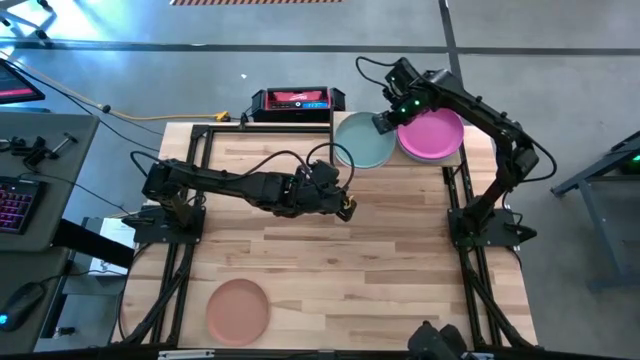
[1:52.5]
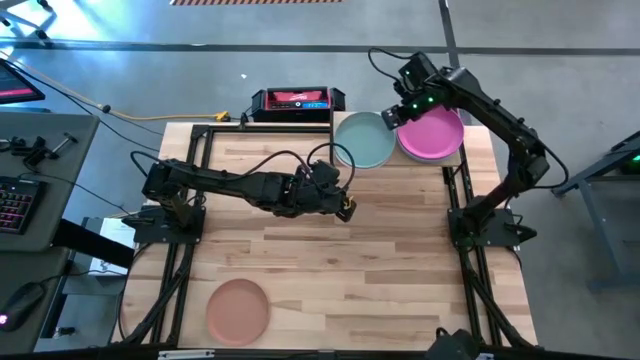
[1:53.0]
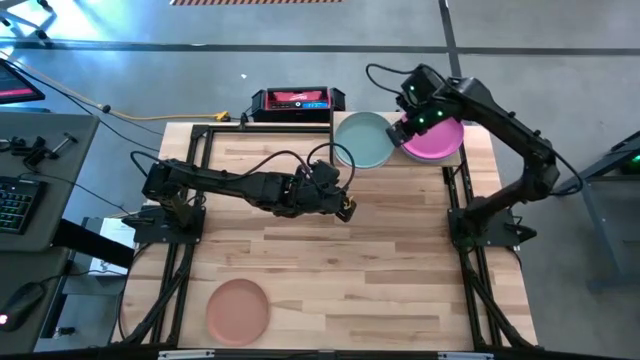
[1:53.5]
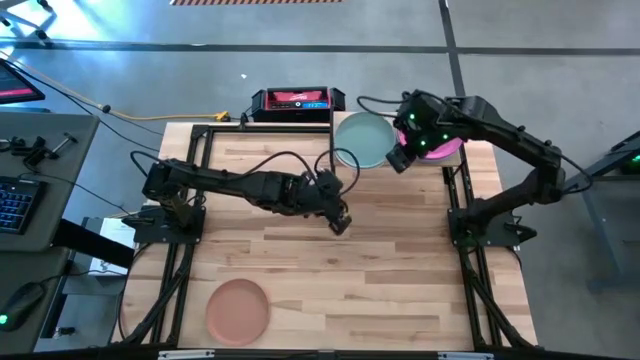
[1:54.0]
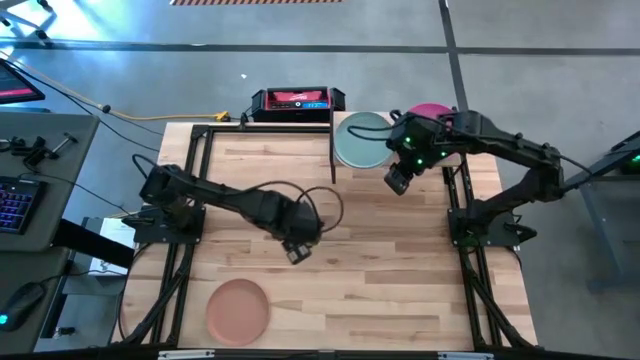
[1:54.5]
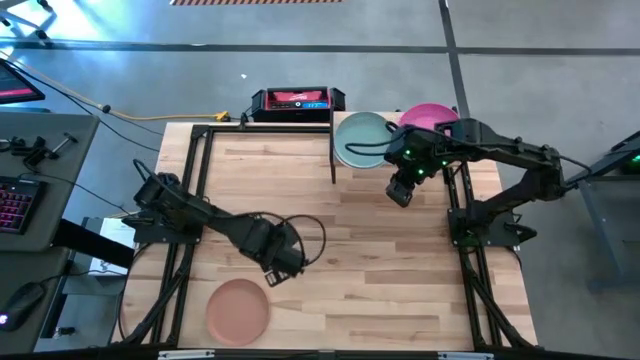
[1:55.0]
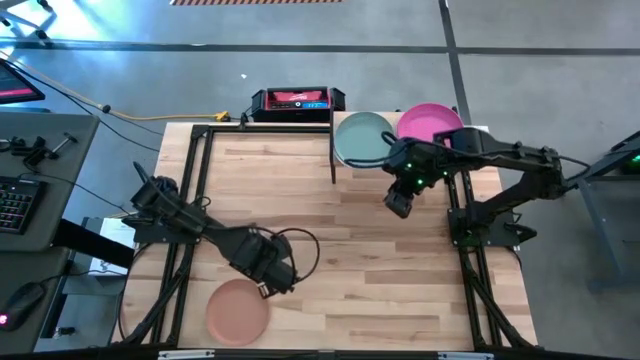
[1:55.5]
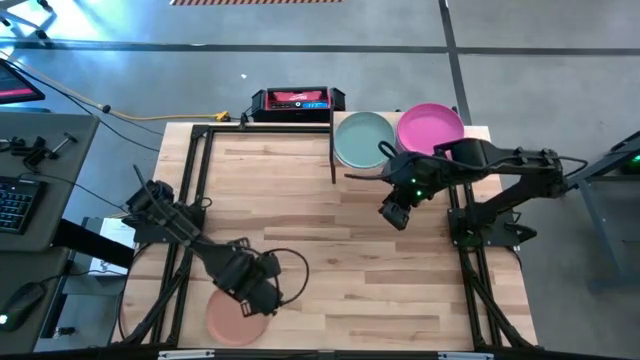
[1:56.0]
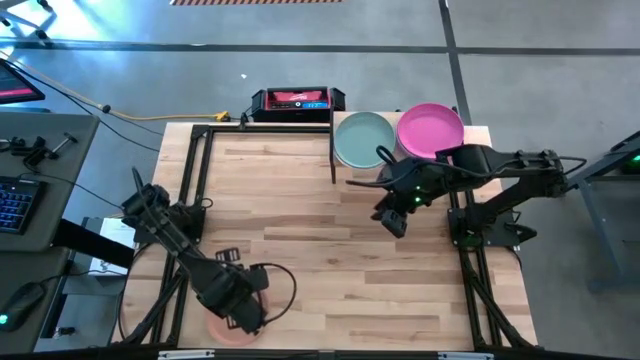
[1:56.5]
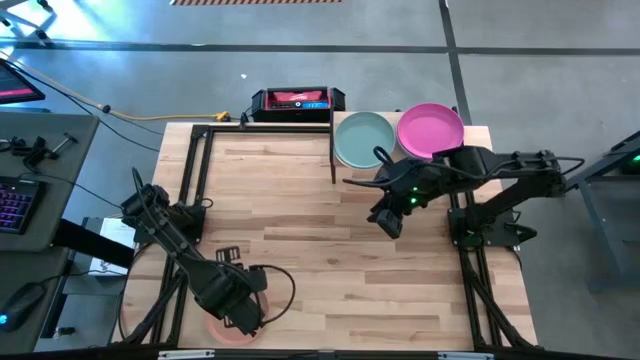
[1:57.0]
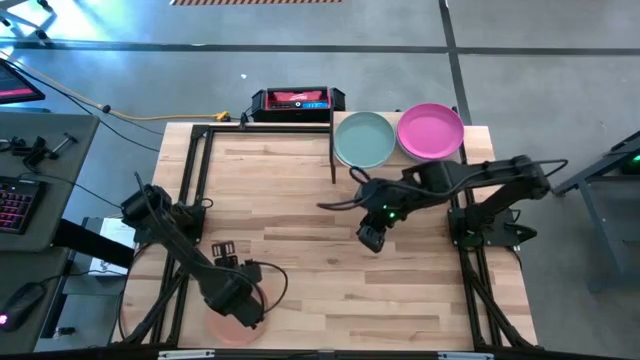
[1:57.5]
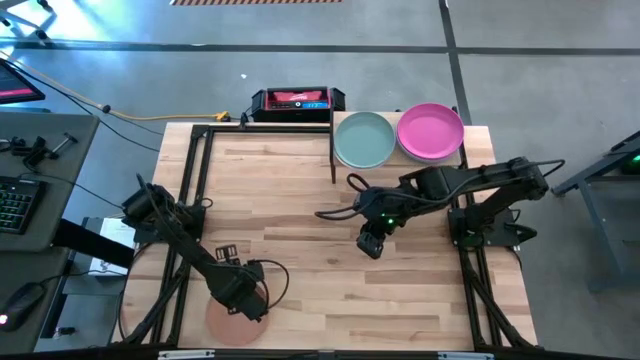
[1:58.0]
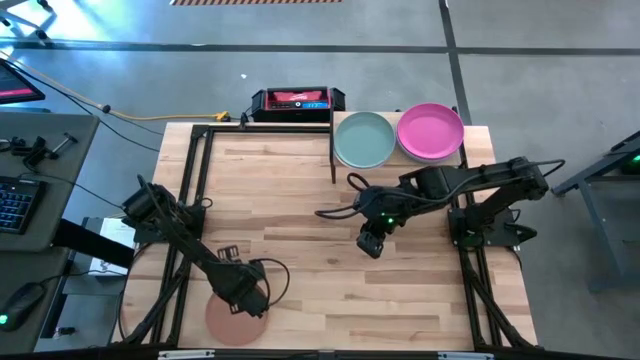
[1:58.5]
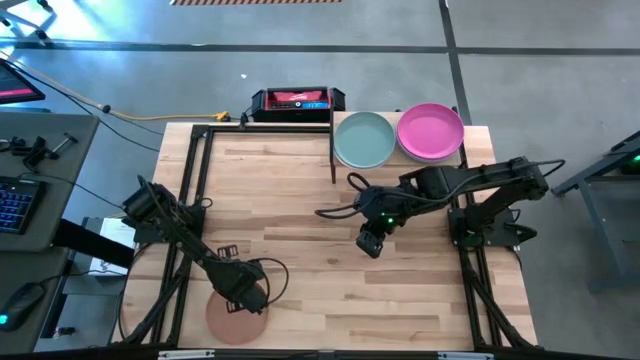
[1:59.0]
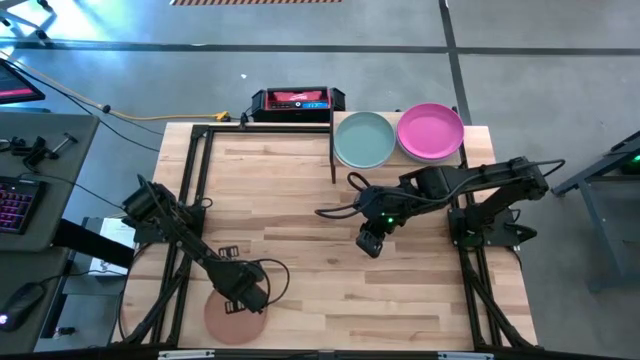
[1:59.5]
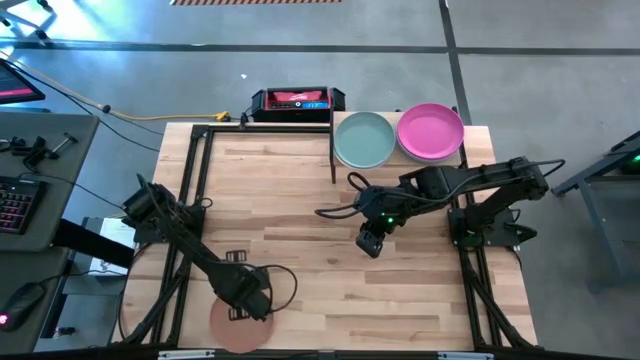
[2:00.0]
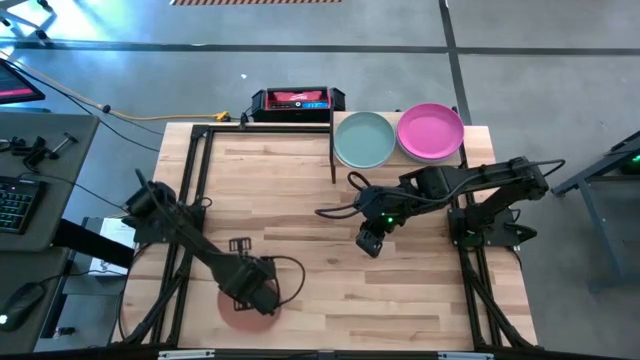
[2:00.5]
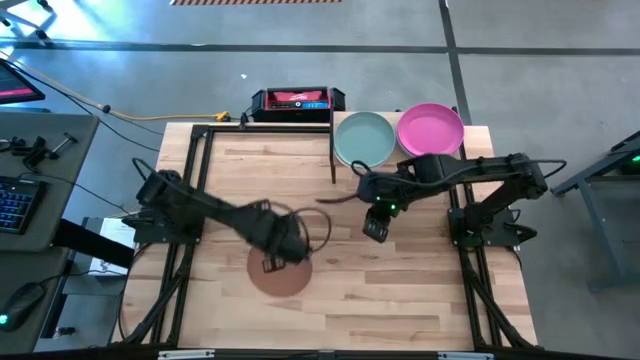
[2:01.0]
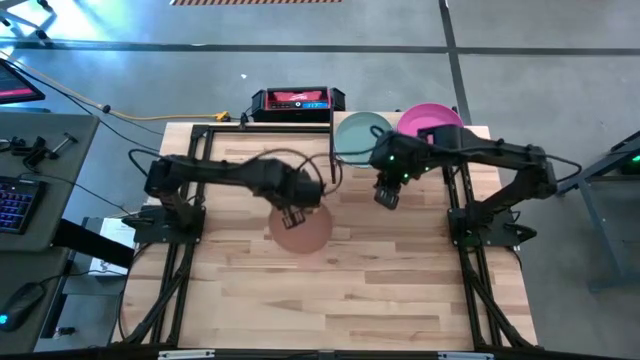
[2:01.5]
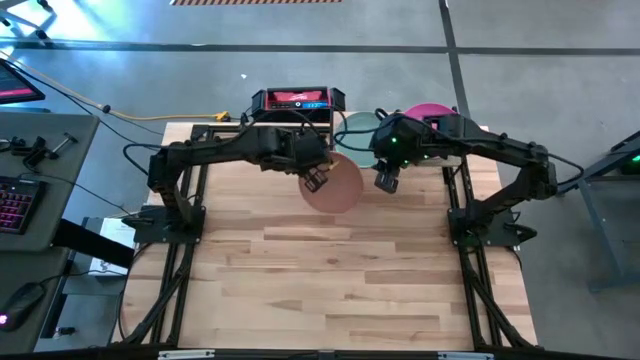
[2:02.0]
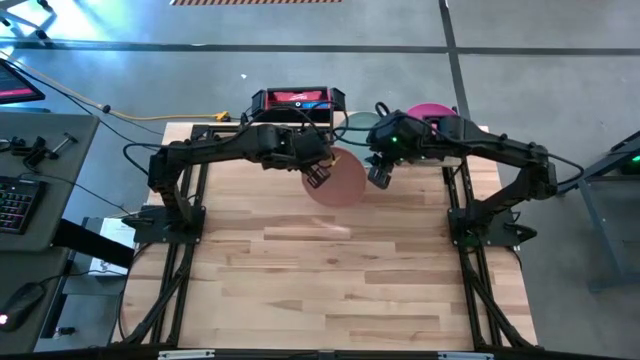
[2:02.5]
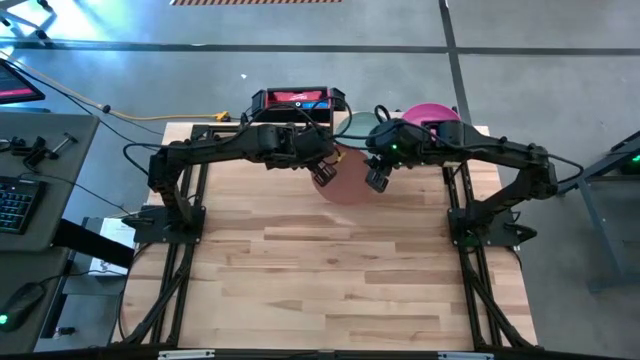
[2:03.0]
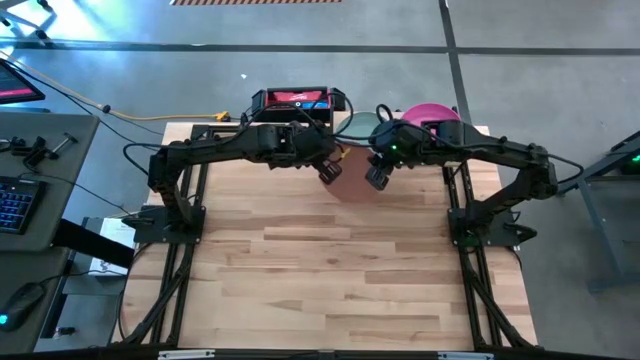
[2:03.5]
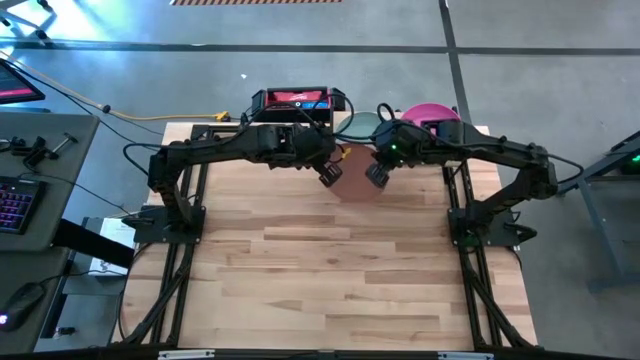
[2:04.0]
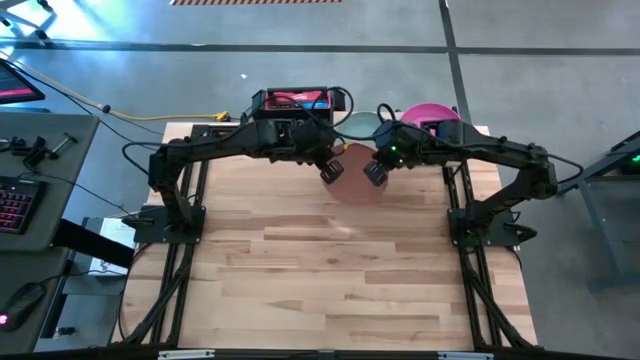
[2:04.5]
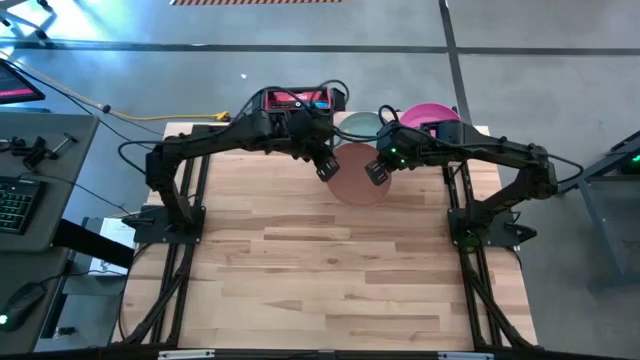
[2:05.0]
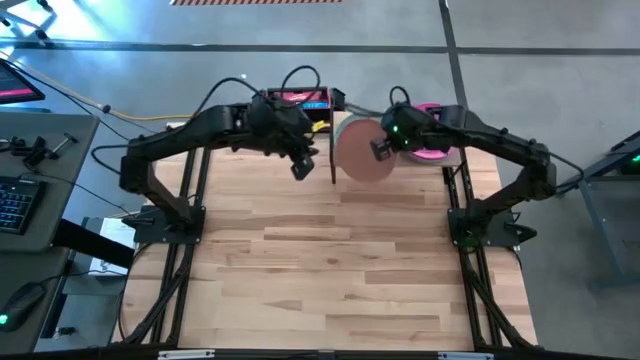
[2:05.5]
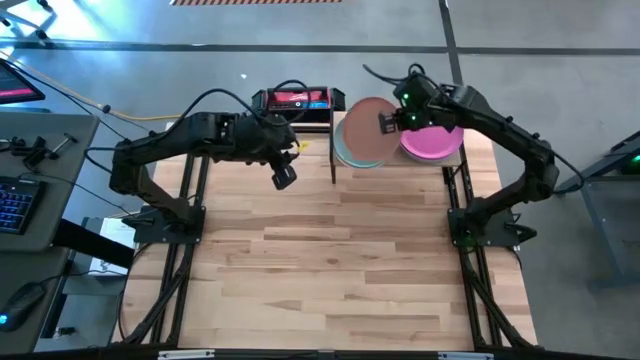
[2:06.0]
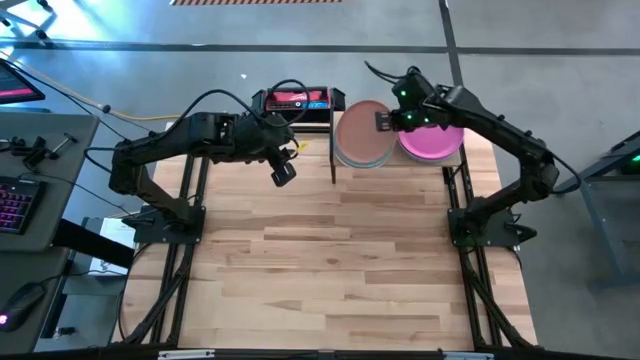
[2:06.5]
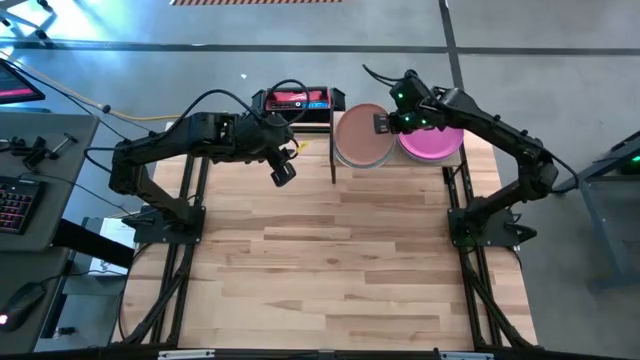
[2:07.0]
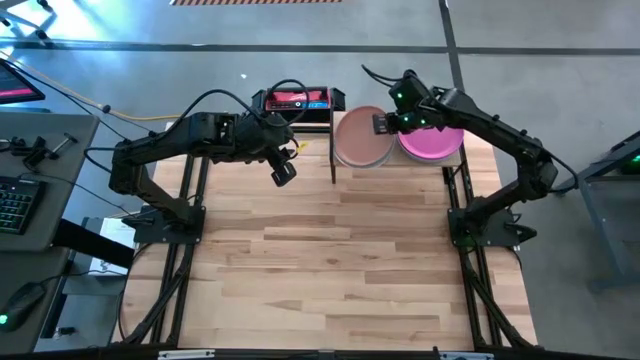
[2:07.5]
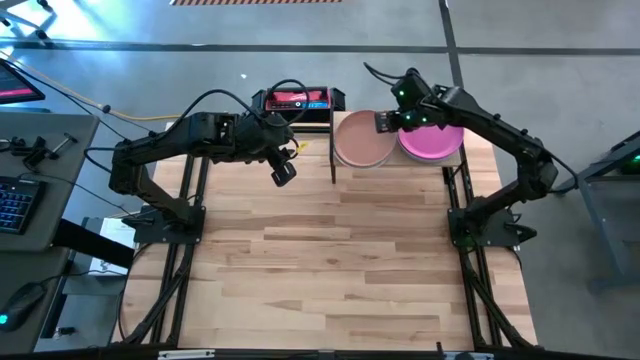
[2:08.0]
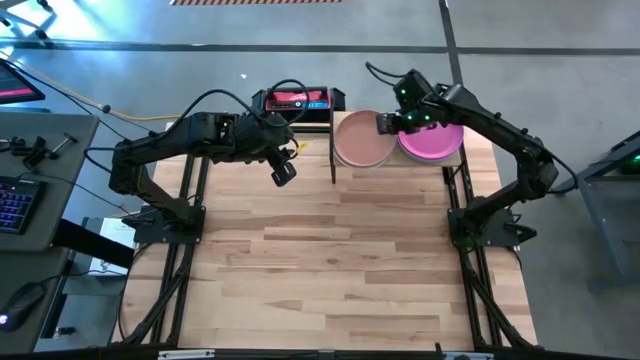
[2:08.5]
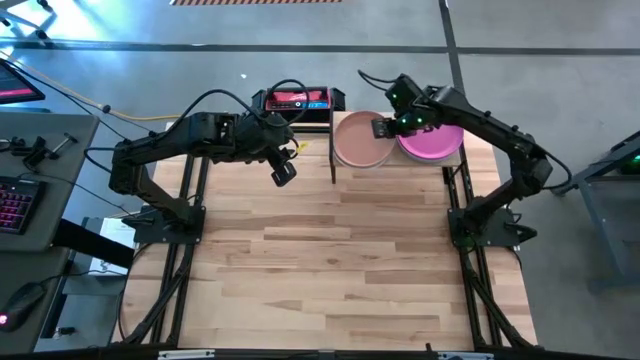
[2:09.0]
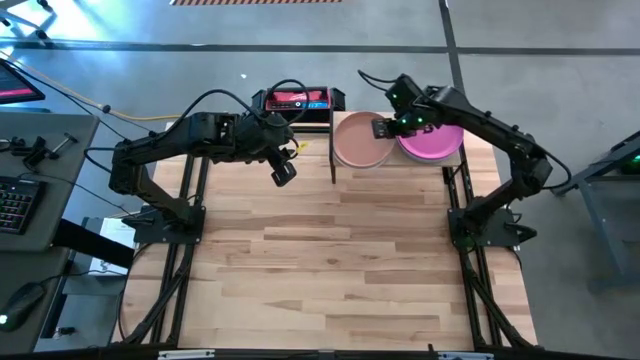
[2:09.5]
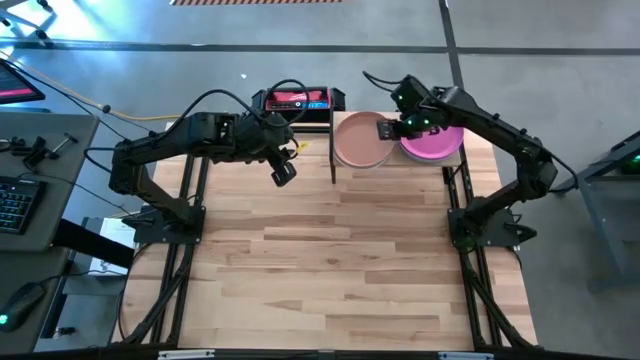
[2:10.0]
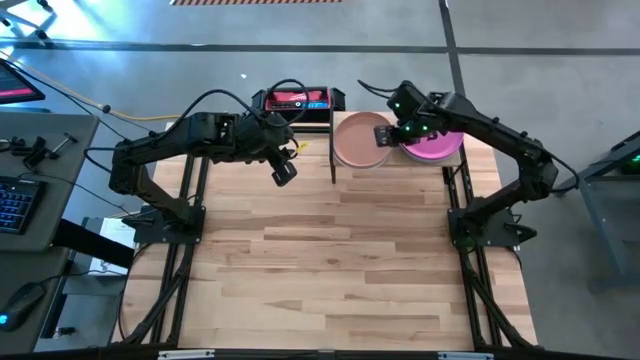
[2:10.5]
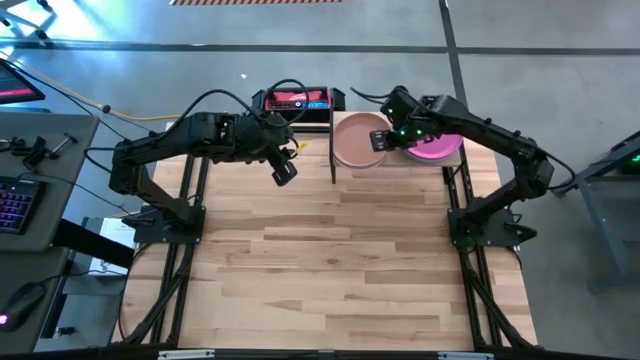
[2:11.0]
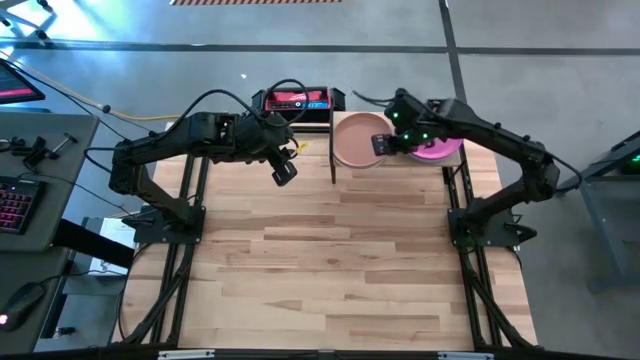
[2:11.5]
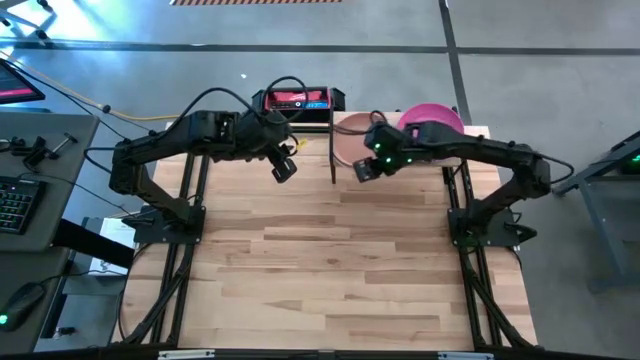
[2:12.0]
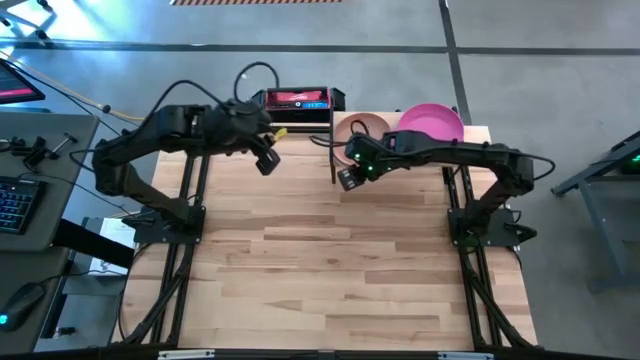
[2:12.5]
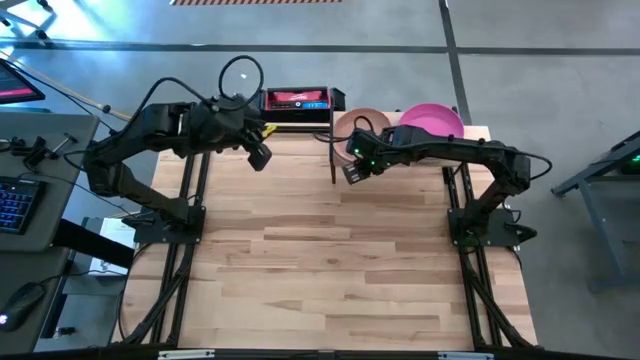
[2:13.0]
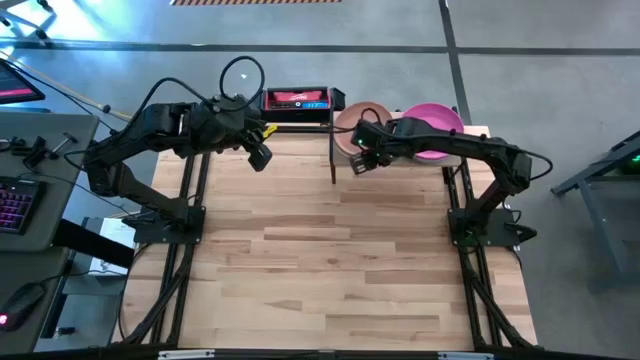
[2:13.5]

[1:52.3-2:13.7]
Task: Place and stack plates onto a shelf
Stack the brown plate on top of the green plate on the shelf

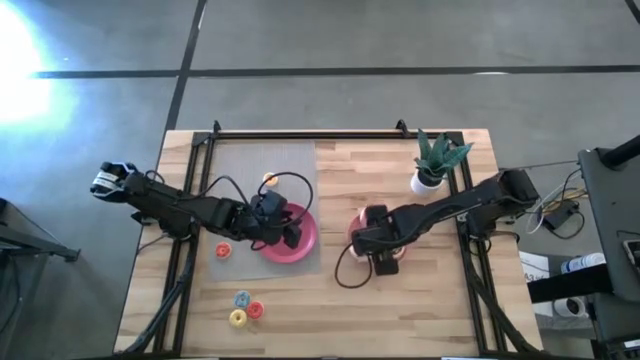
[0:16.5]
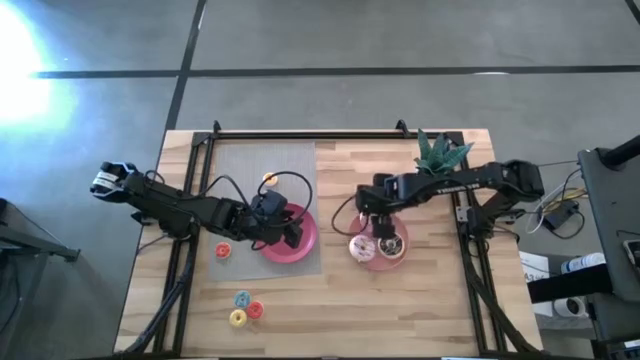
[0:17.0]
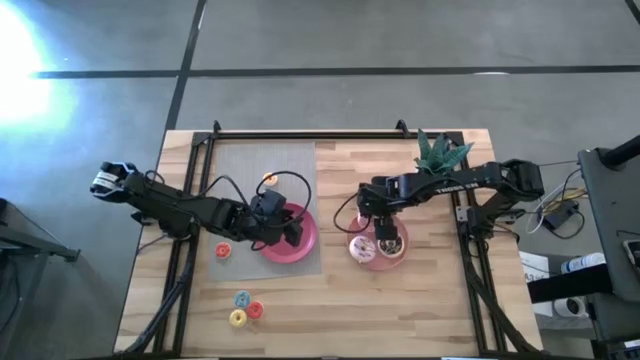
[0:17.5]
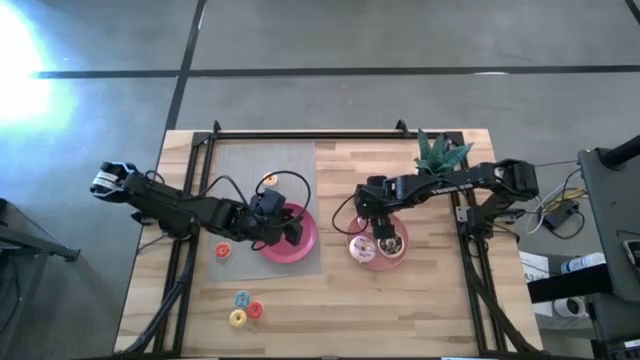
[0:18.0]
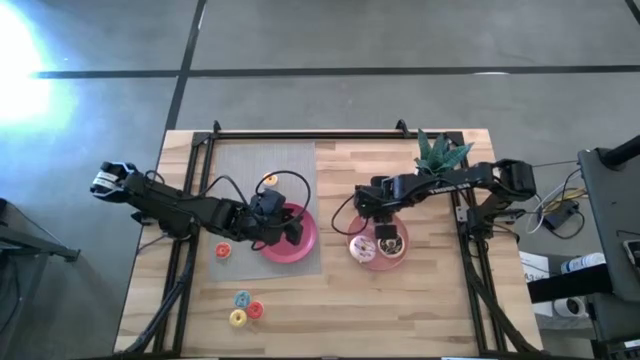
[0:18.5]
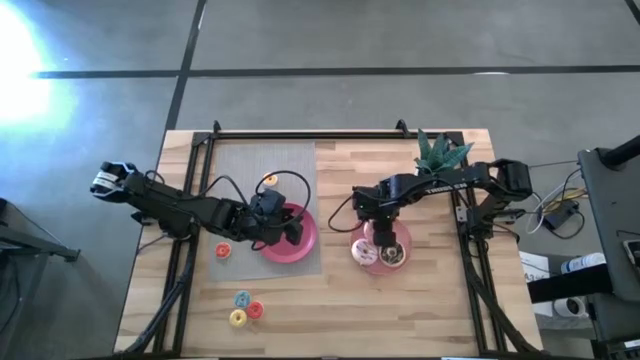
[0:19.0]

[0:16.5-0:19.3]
Task: Pick & Place donuts
Adjust the large pink donut
